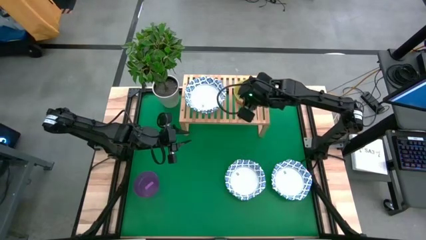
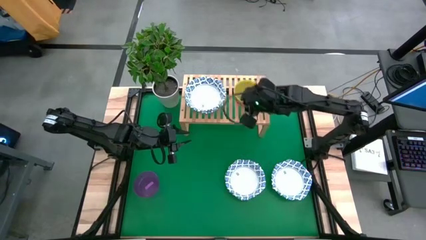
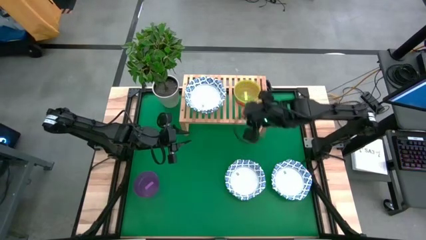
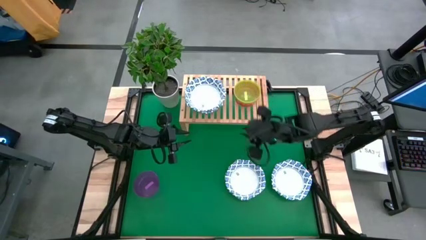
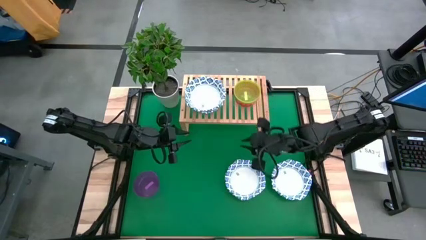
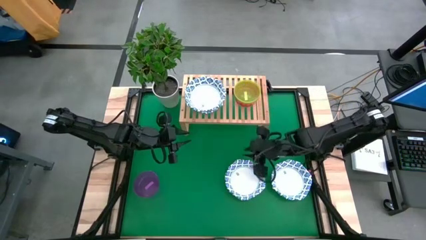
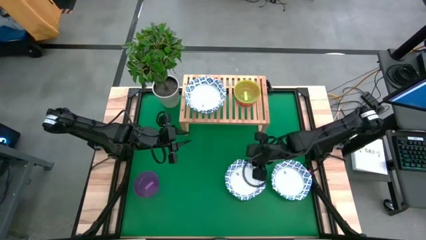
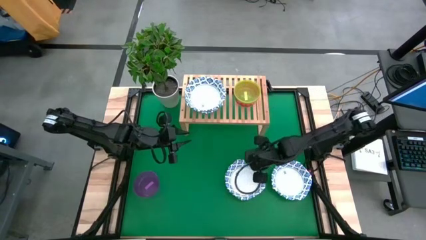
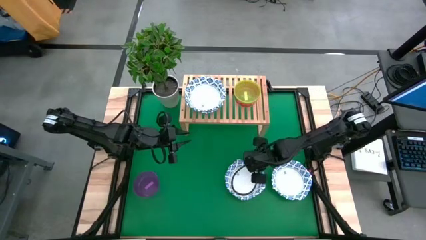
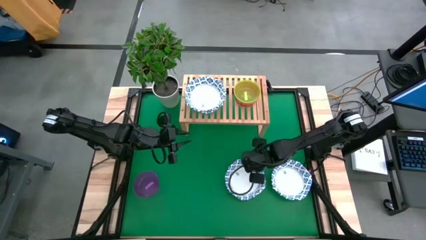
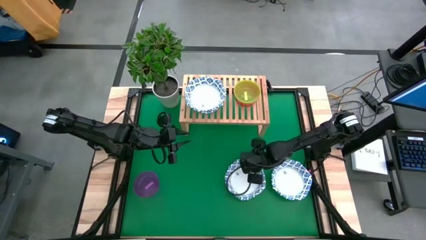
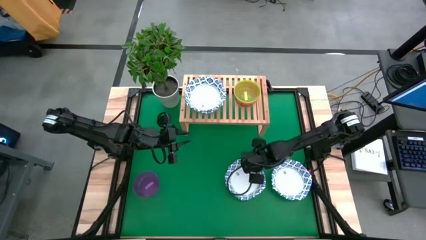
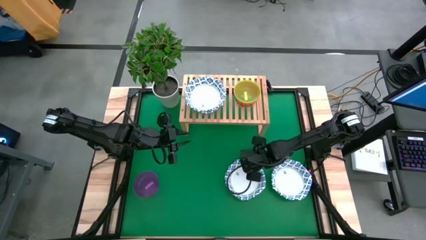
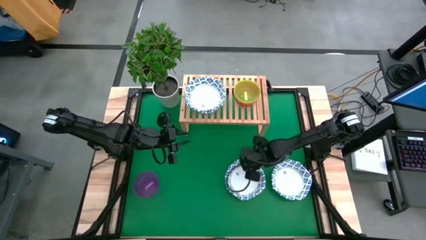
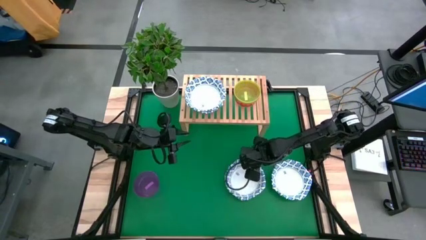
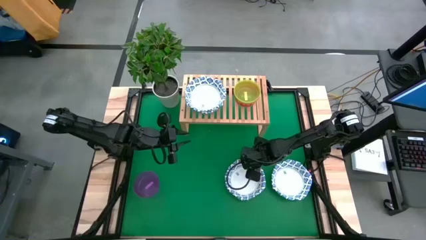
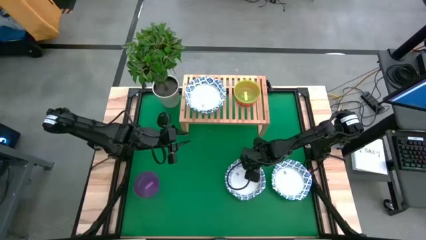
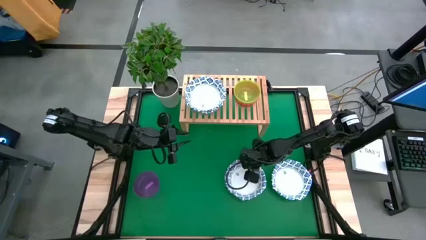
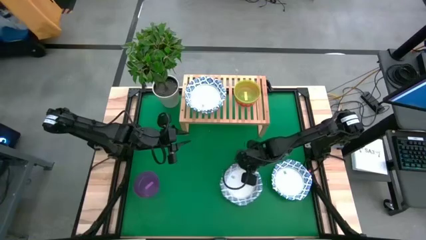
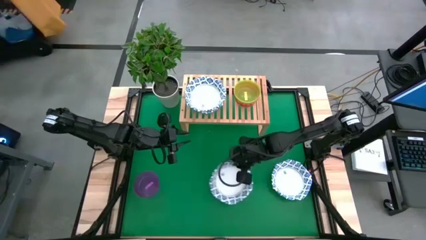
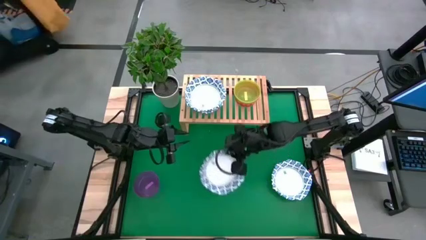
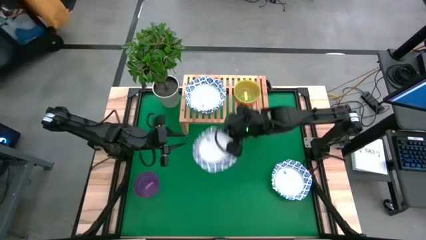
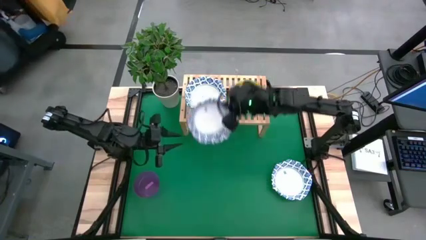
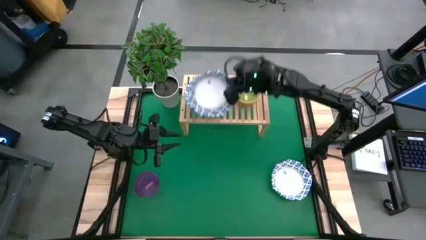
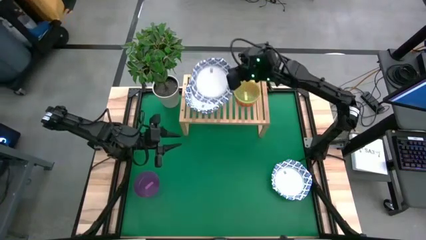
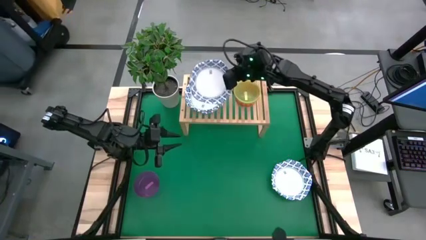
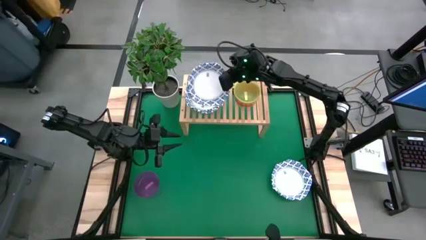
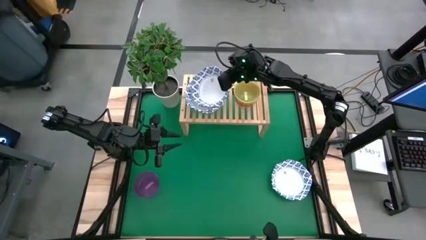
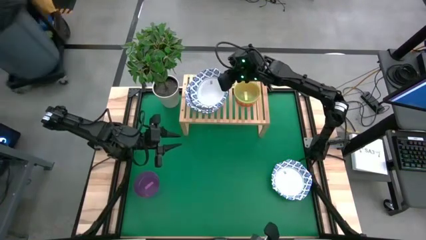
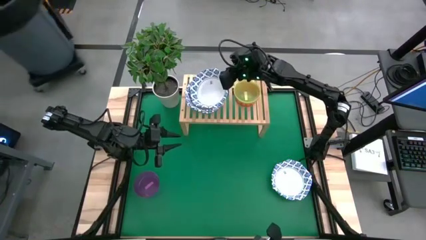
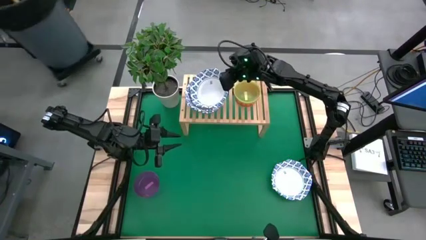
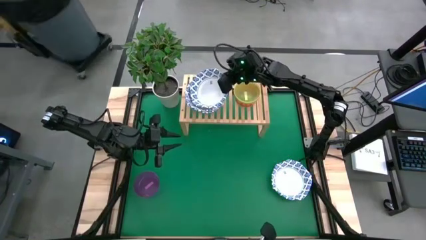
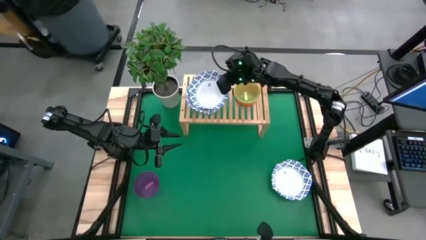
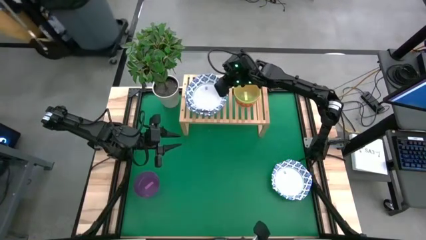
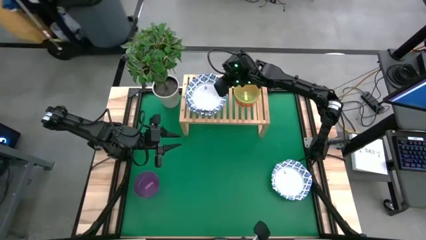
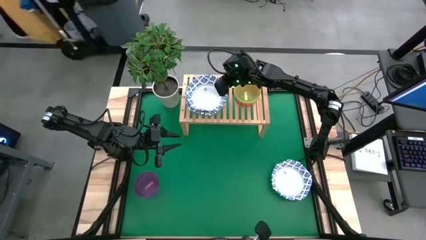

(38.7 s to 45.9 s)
Task: Place and stack bowls onto a shelf
Stack the white and blue bowl on top of the white and blue bowl

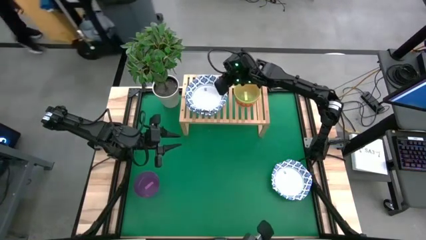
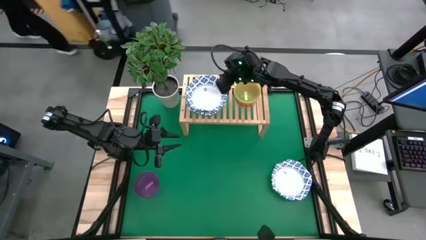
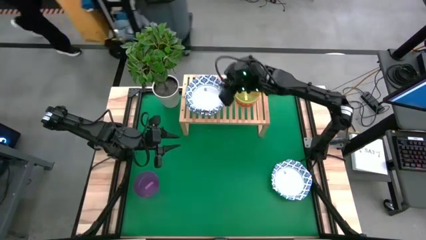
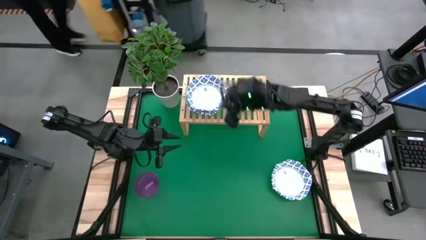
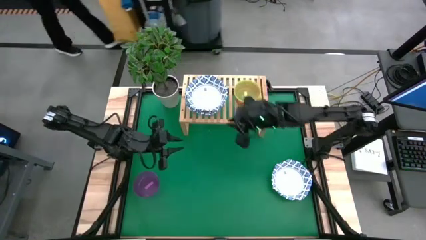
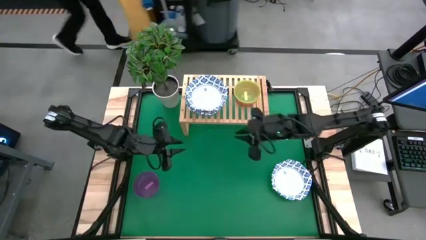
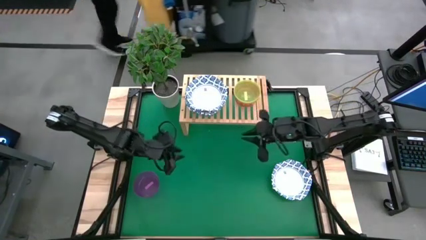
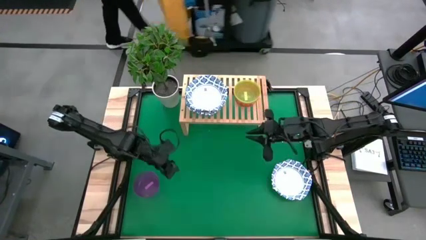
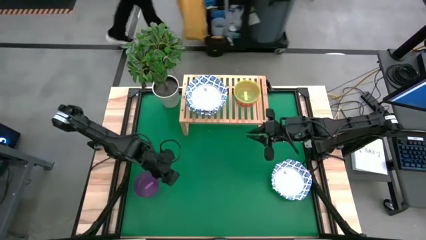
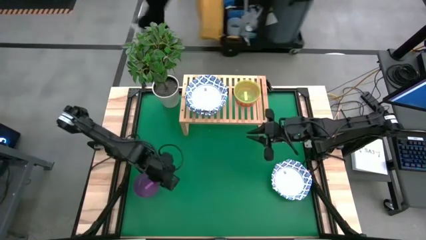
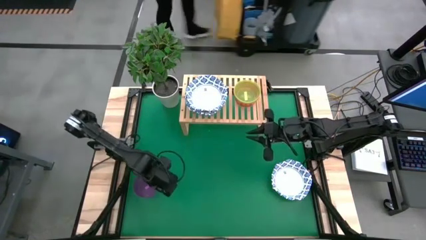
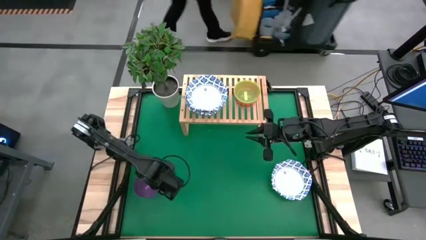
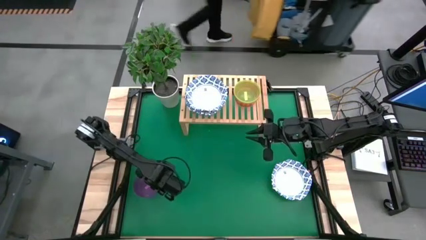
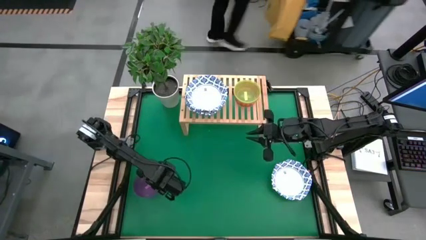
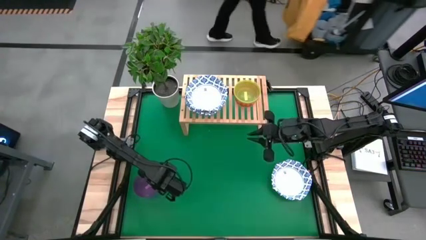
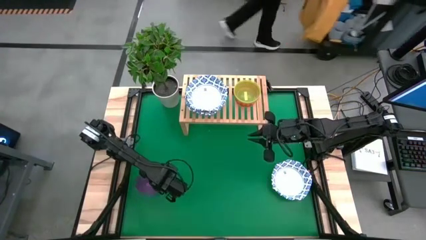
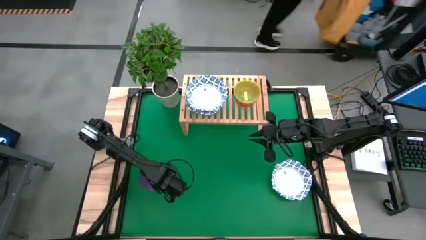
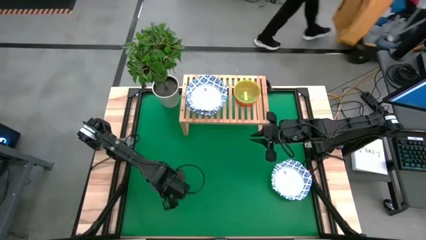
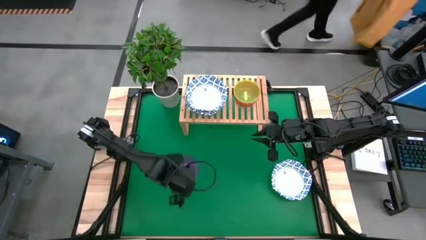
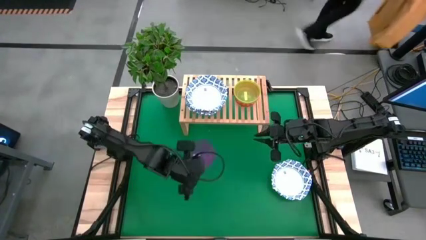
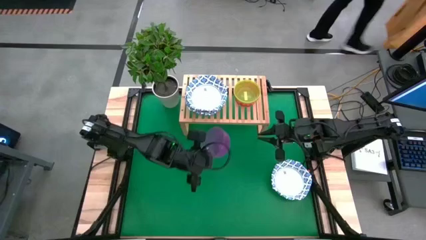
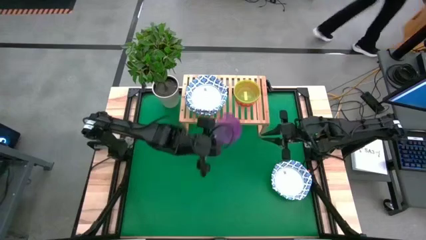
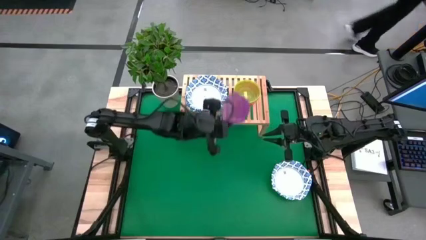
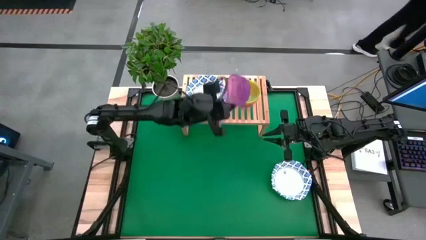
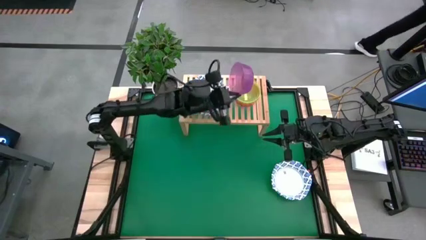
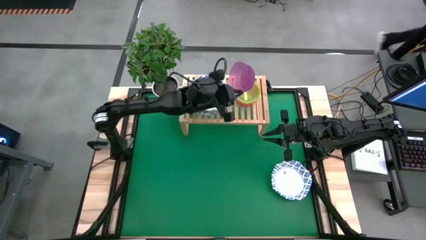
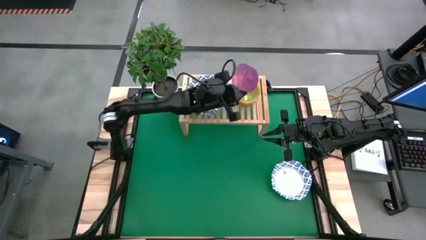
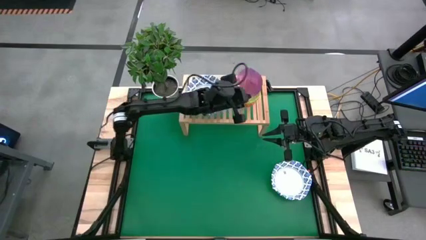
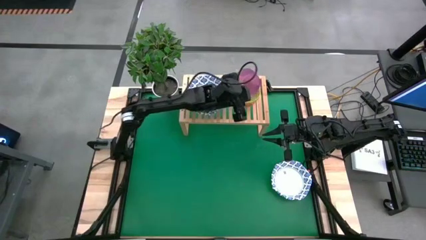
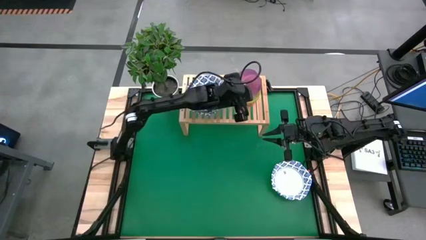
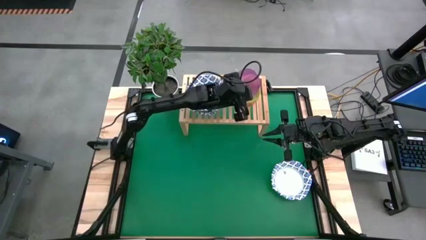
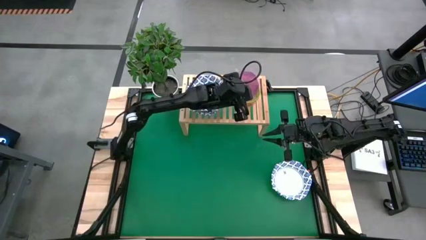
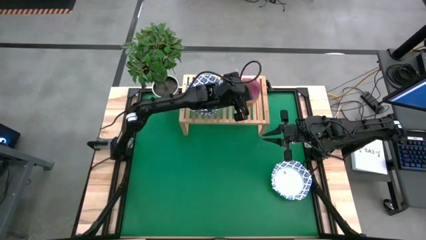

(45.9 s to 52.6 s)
Stack the purple bowl on top of the yellow bowl

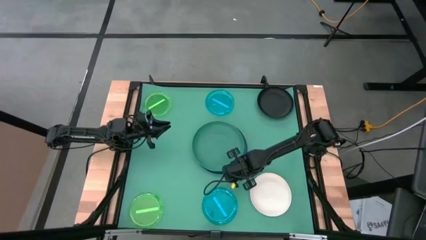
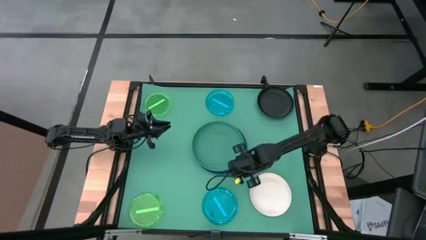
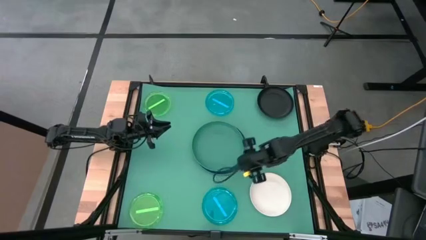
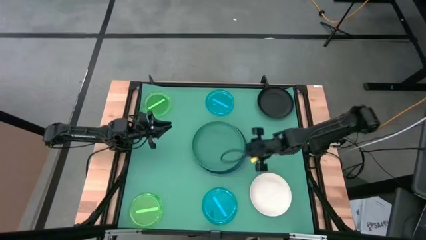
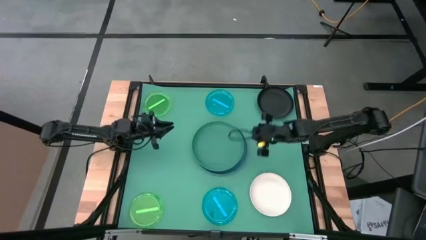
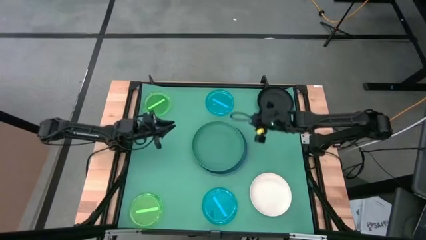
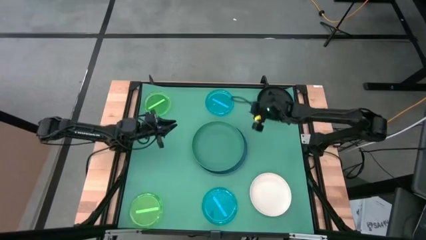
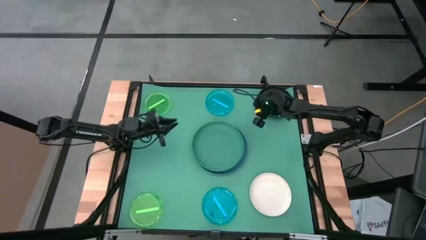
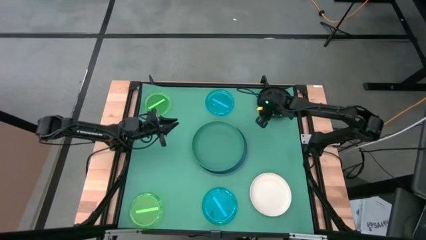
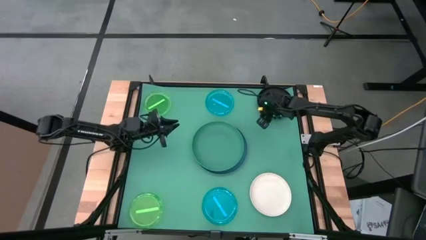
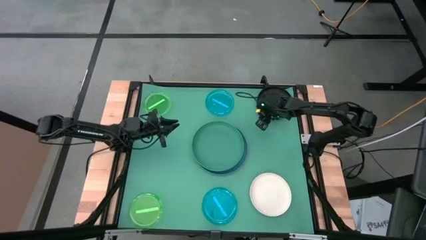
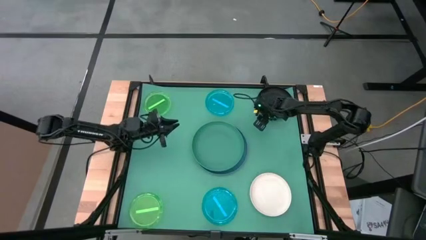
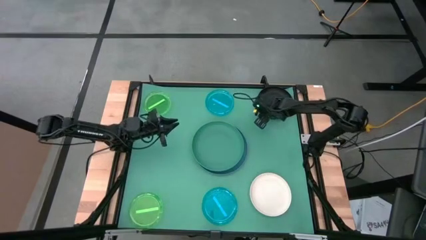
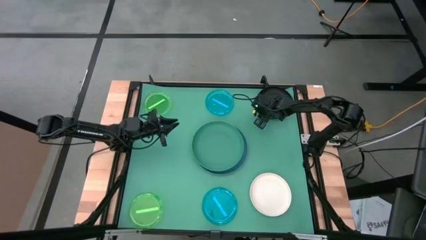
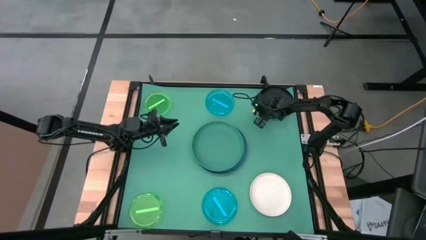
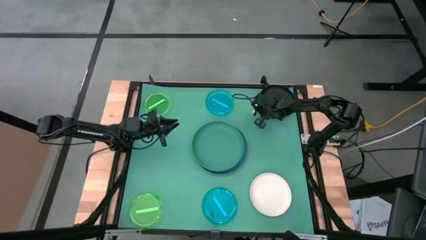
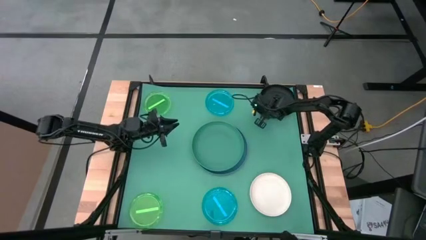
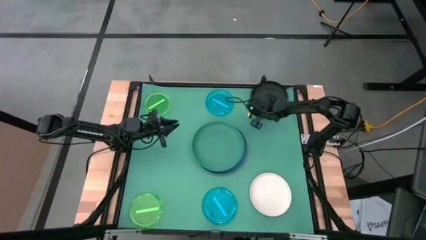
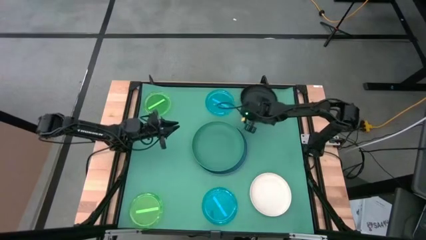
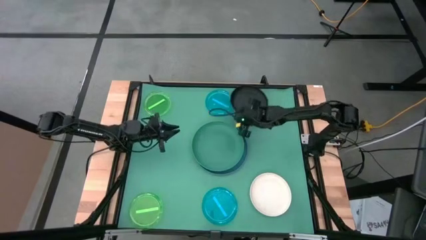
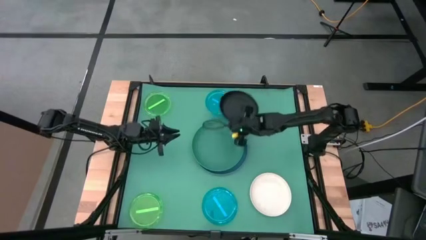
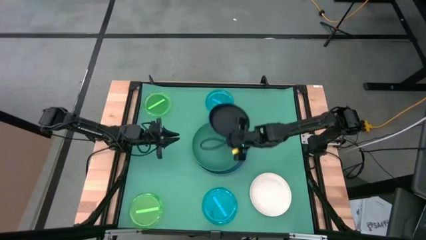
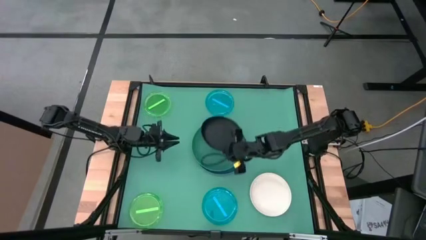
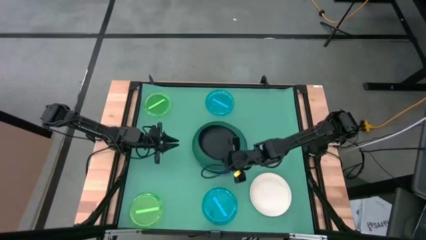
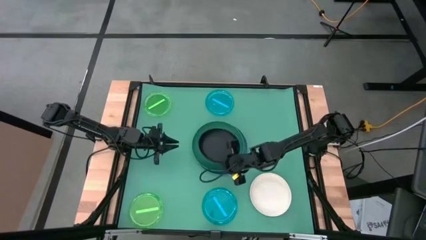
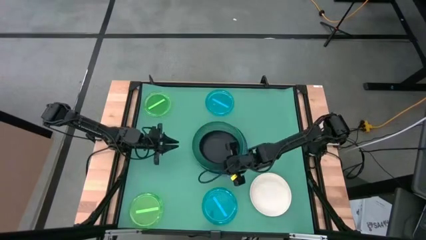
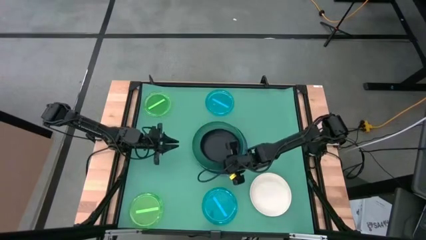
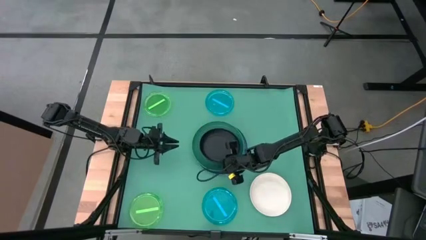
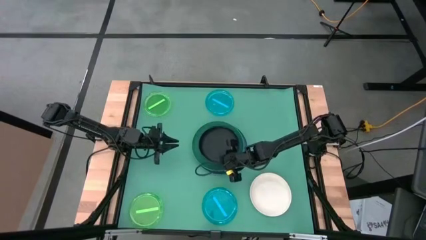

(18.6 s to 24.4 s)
Task: Stack plastic plates
Stack the black plate on top of the green plate
